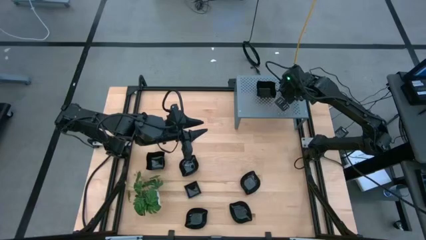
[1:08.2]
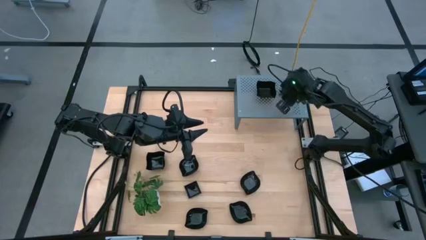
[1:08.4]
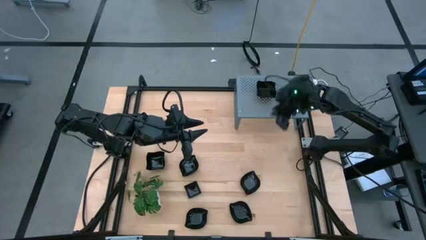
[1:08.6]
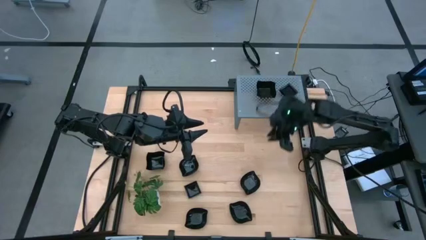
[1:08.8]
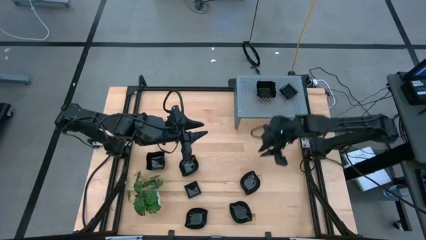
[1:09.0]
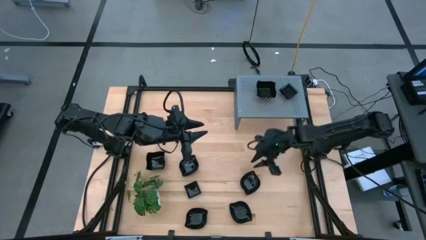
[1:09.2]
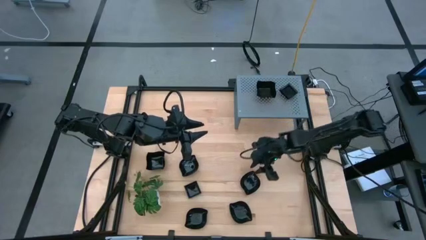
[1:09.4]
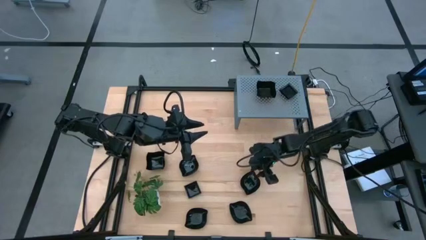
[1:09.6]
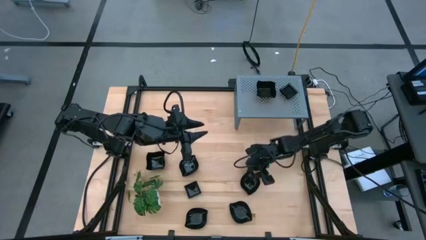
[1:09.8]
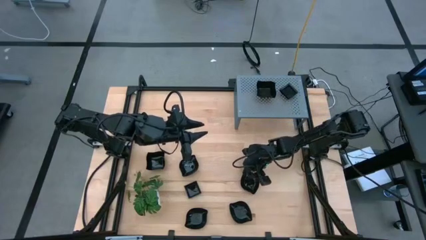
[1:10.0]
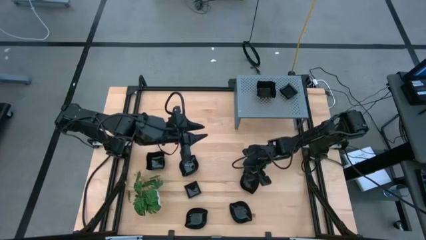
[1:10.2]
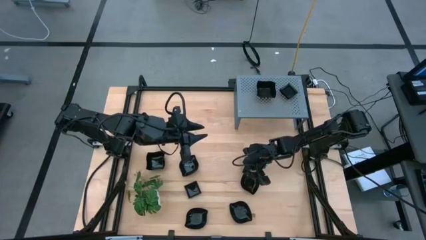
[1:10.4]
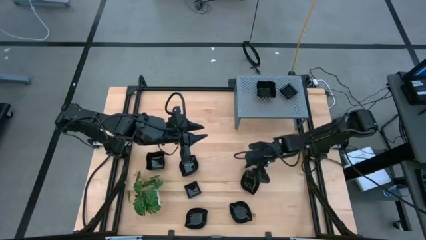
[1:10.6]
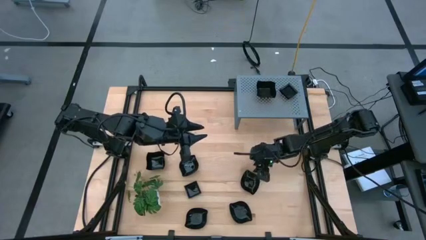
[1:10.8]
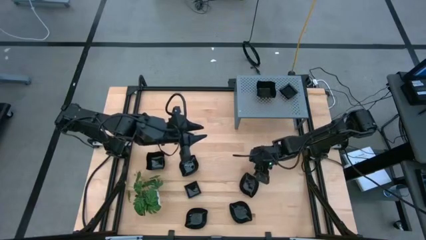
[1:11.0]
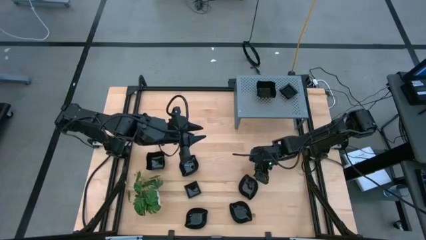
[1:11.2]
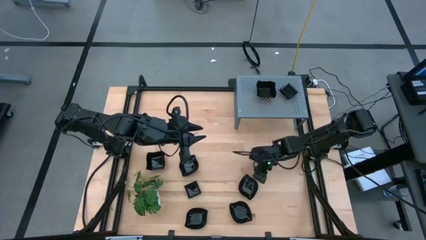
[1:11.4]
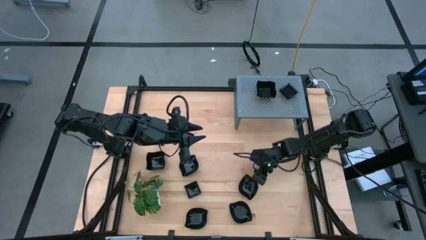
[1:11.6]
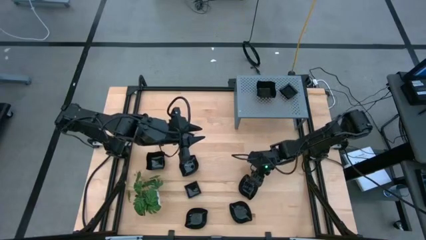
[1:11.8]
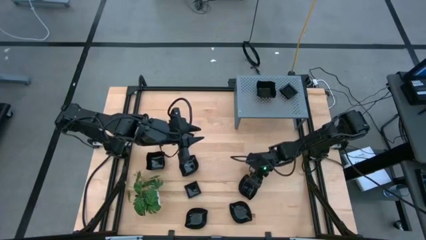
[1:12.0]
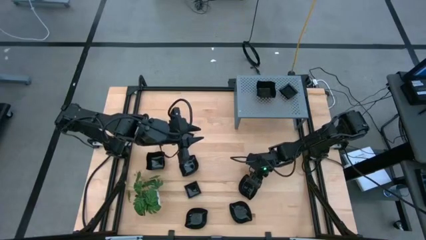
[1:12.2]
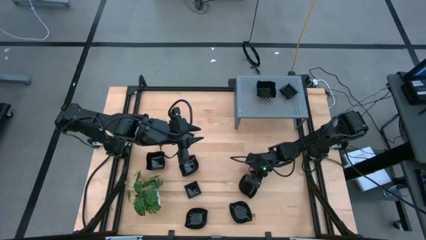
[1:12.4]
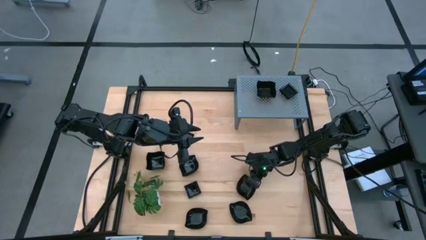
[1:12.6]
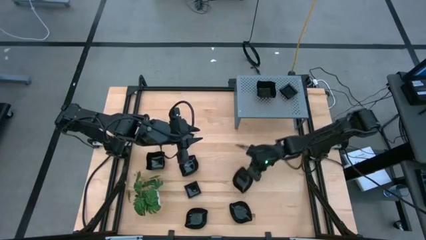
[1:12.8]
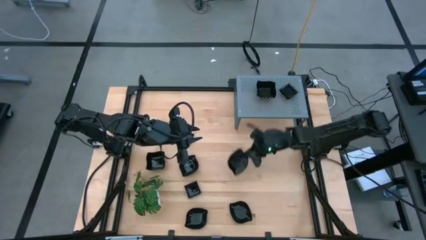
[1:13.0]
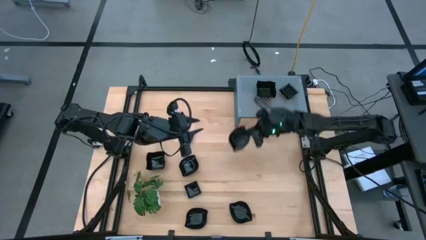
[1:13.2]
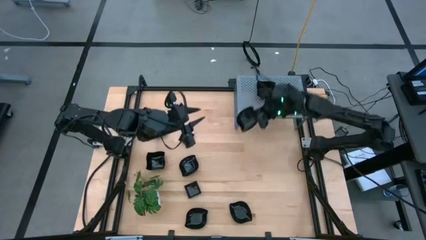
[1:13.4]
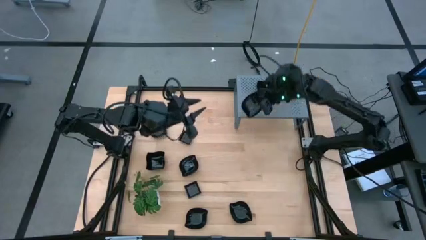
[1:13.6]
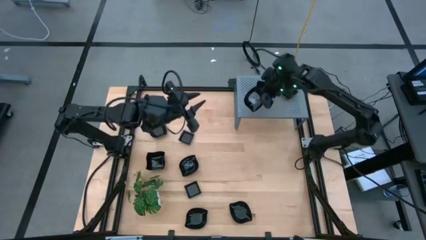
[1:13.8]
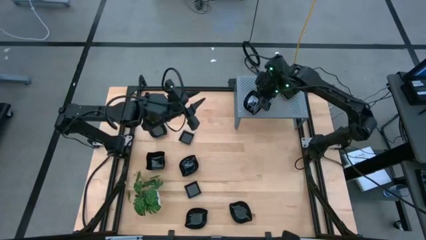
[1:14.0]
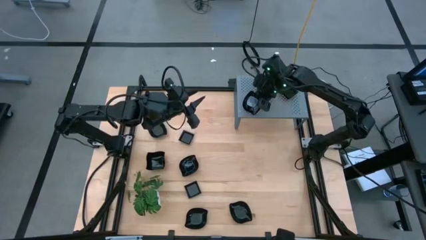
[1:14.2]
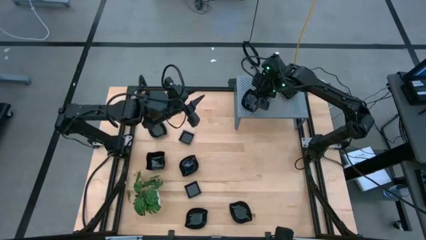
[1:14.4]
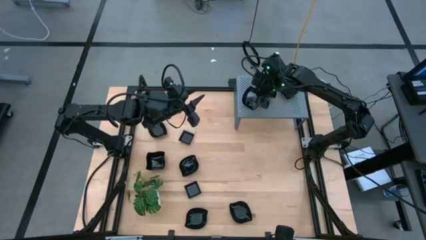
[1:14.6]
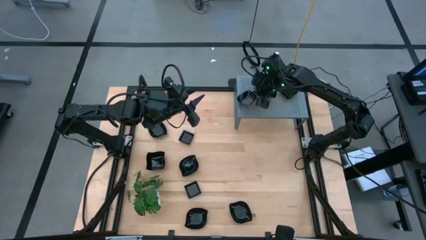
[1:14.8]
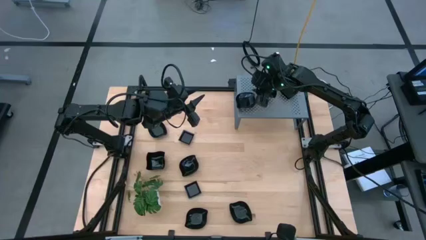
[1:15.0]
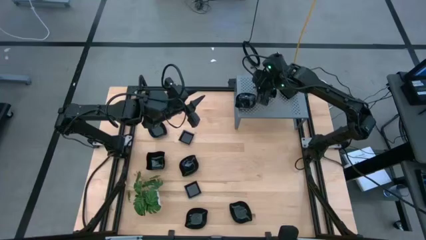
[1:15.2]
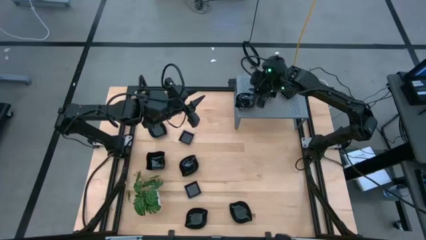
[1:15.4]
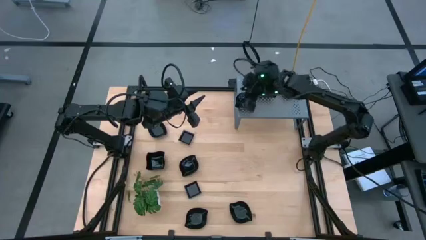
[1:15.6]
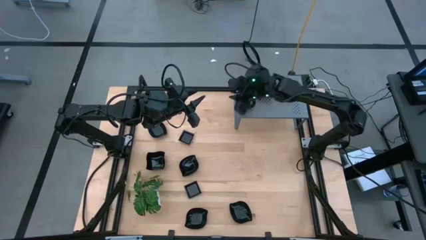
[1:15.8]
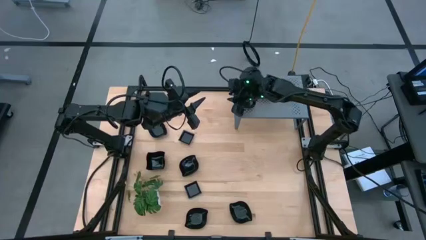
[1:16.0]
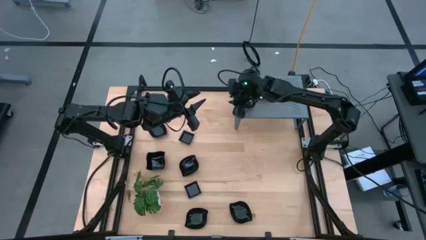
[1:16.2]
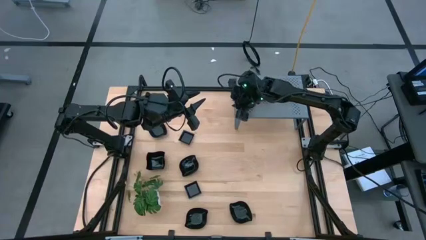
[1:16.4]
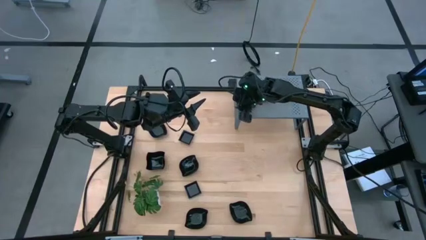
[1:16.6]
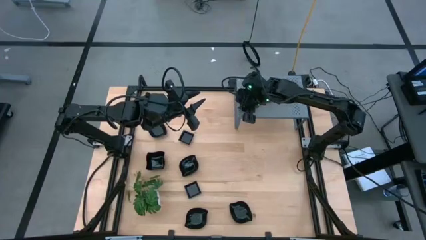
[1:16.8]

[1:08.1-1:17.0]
Task: Pick & Place Mini shaped plates
Put the leaf-shaped plate on the shelf

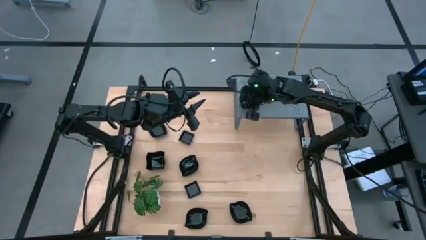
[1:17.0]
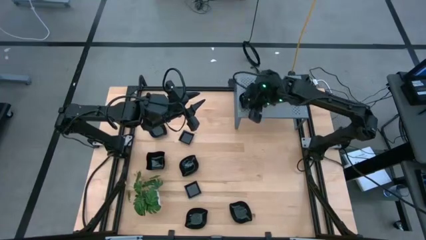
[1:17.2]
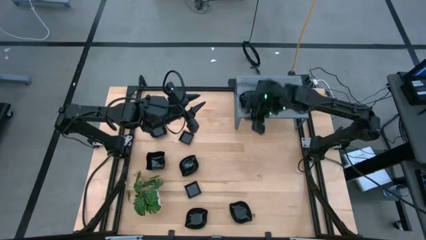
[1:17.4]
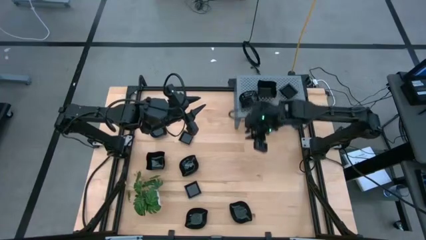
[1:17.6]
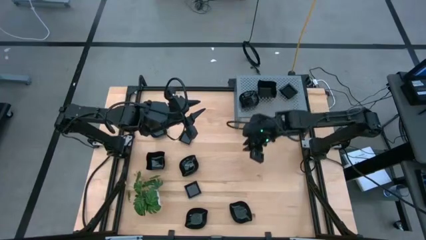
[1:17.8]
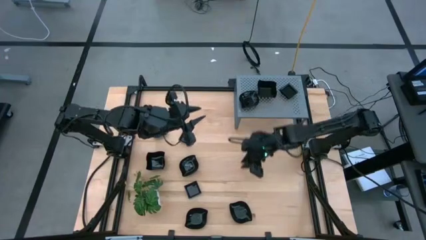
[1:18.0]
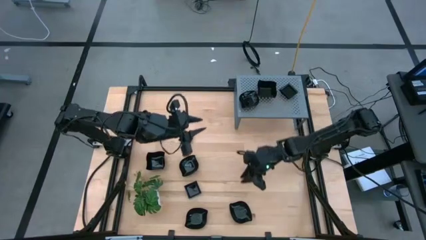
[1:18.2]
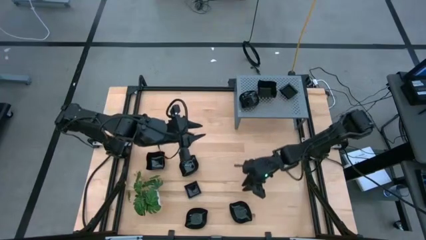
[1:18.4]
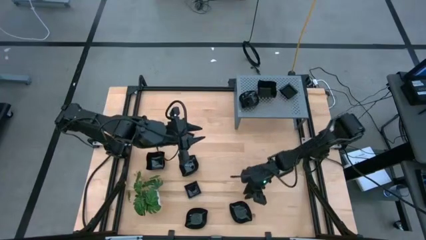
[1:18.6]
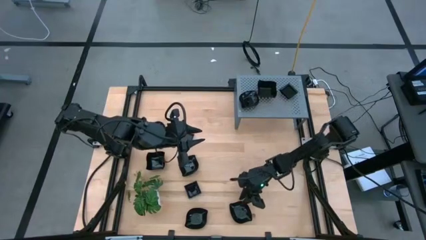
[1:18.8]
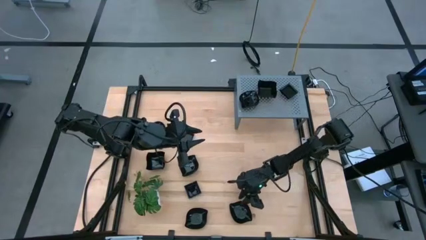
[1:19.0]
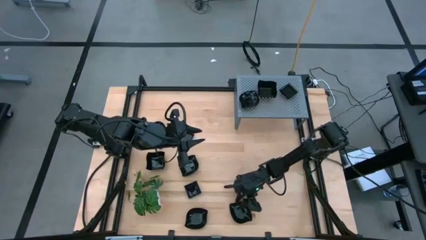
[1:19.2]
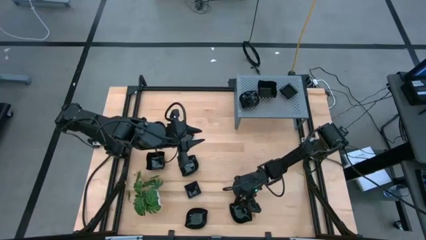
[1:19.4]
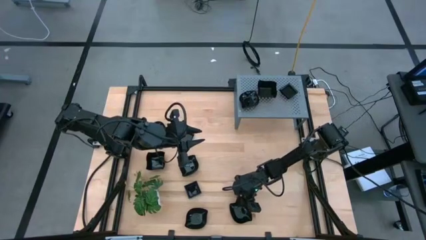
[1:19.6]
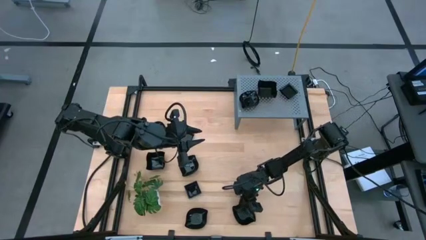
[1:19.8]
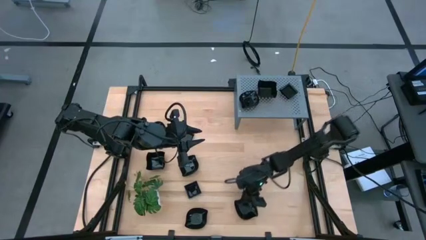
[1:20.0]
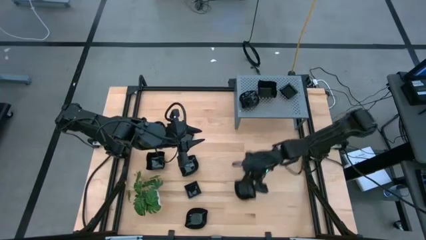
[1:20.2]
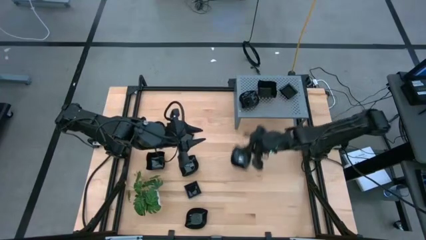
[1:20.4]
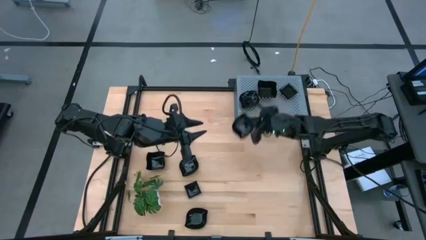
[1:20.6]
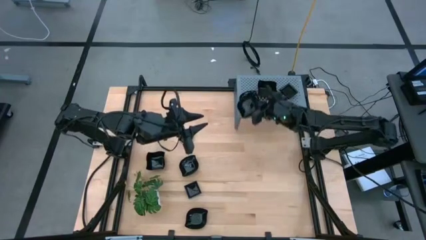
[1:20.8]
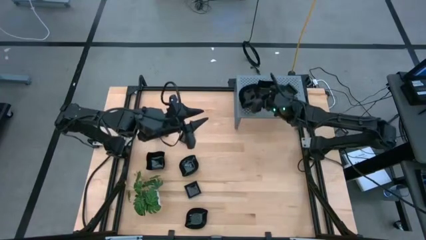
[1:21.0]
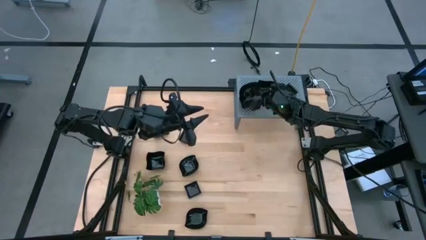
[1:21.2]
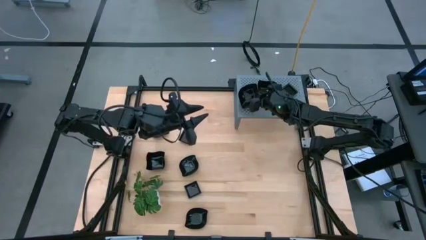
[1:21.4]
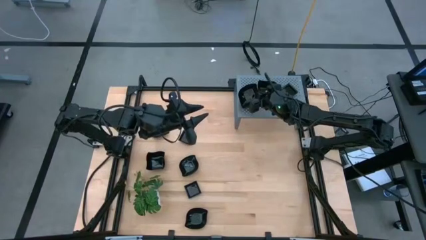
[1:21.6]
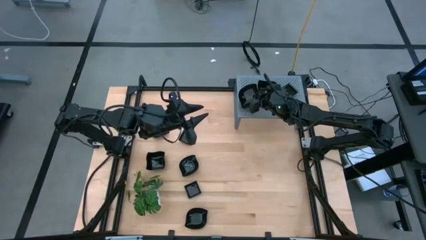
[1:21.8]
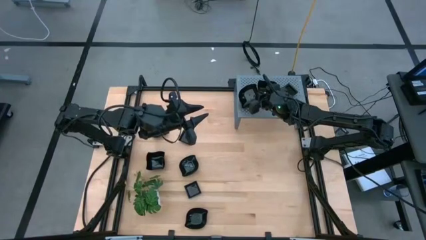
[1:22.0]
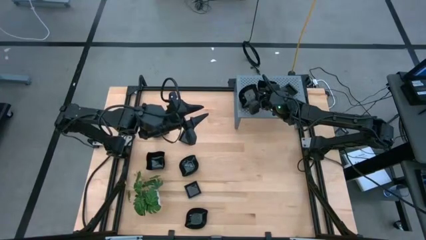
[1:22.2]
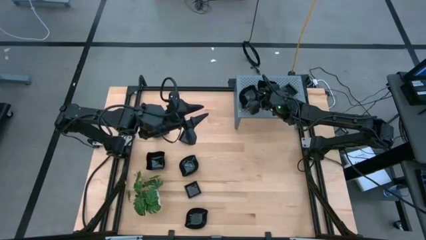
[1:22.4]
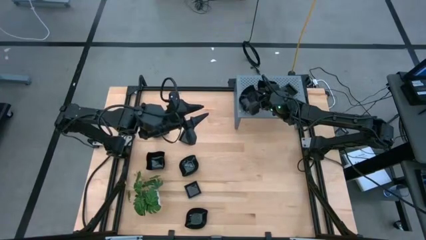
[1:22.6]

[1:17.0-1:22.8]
Stack the leaf-shaped plate on the leaf-shaped plate on the shelf
